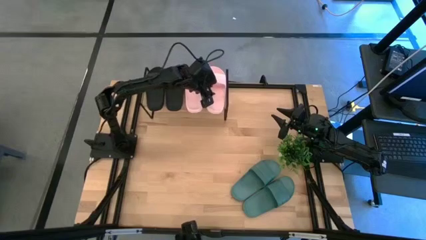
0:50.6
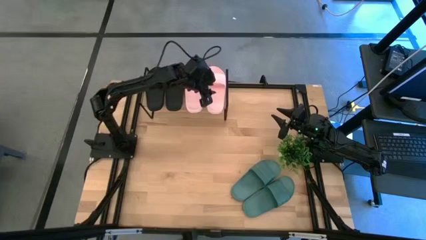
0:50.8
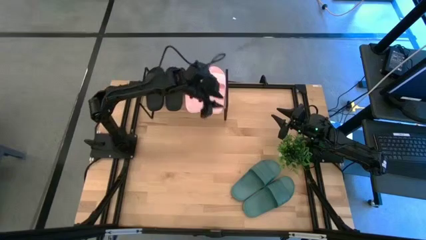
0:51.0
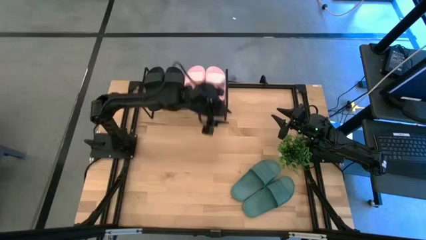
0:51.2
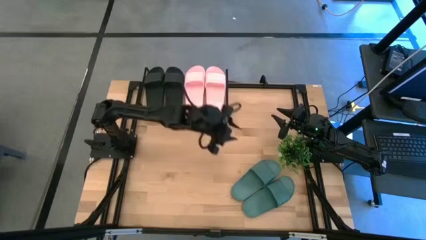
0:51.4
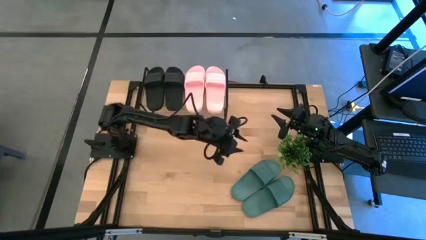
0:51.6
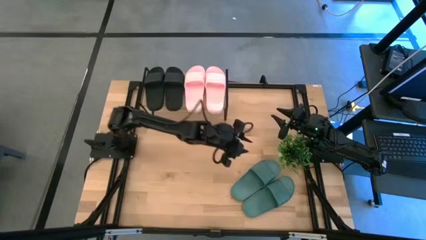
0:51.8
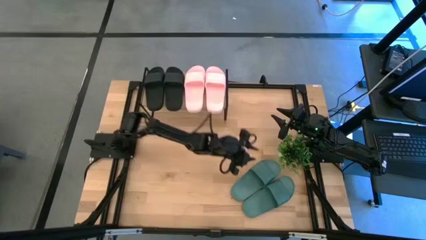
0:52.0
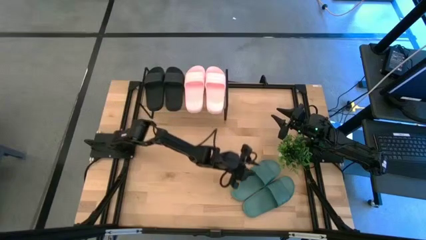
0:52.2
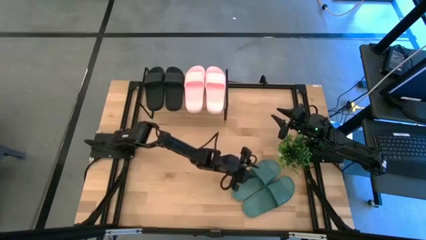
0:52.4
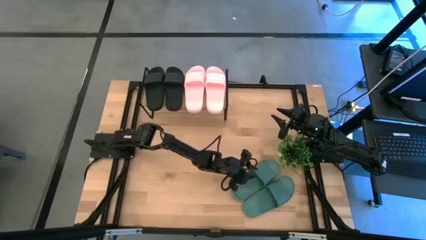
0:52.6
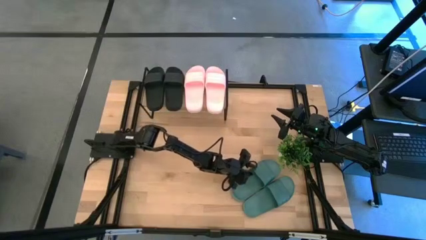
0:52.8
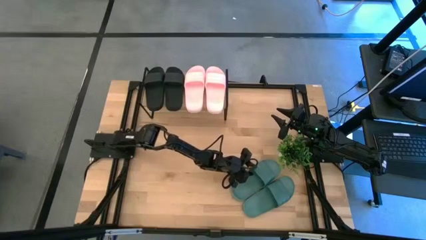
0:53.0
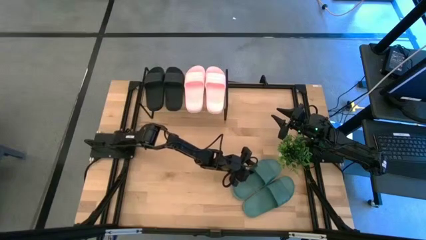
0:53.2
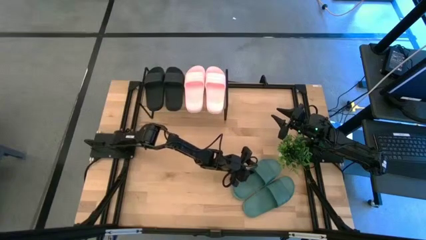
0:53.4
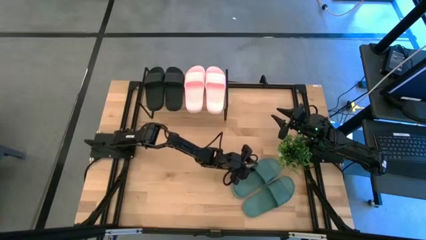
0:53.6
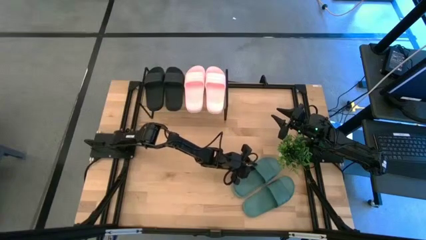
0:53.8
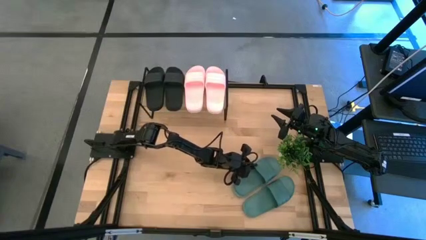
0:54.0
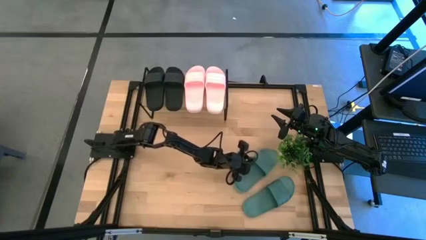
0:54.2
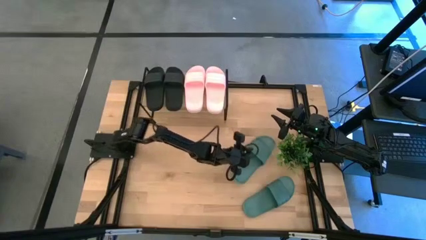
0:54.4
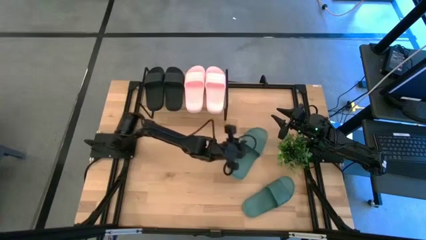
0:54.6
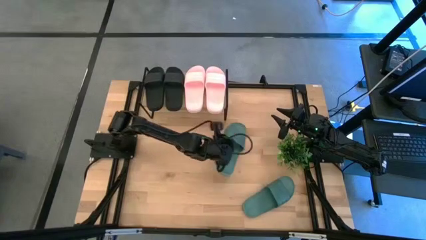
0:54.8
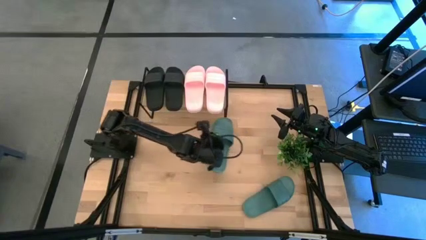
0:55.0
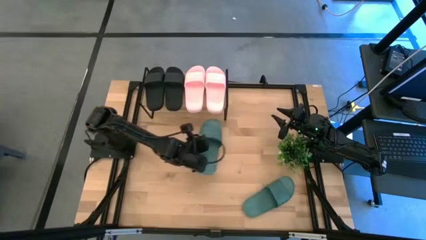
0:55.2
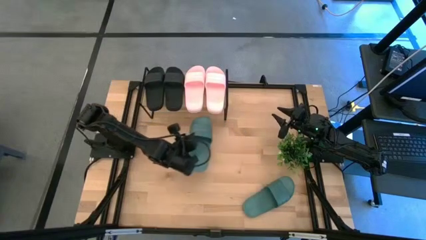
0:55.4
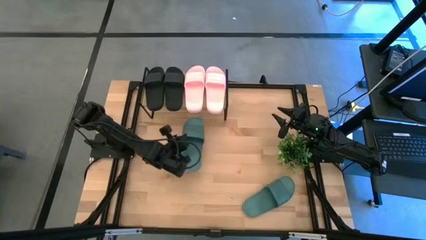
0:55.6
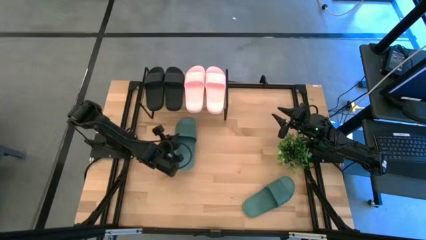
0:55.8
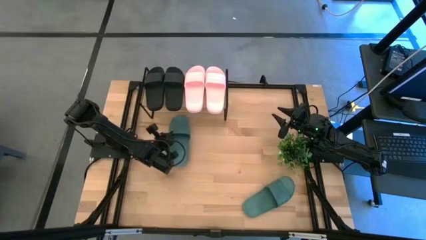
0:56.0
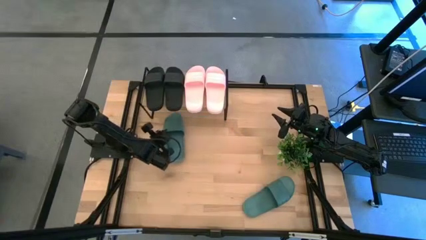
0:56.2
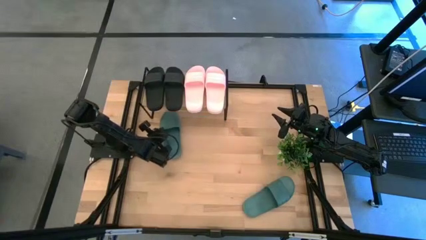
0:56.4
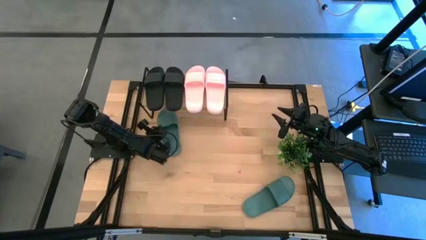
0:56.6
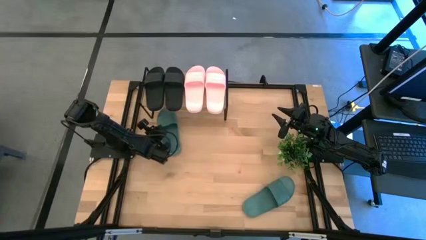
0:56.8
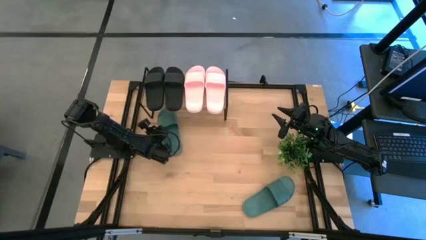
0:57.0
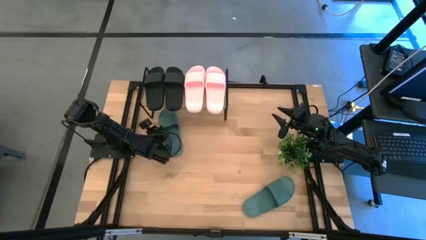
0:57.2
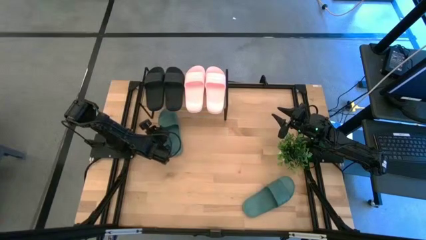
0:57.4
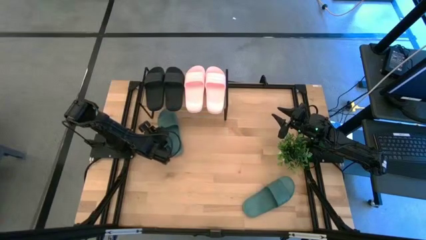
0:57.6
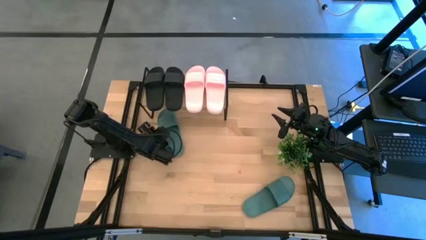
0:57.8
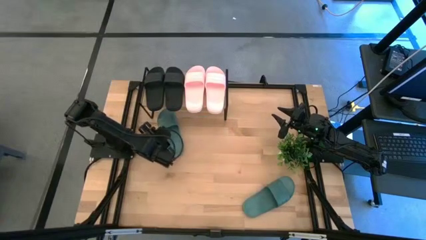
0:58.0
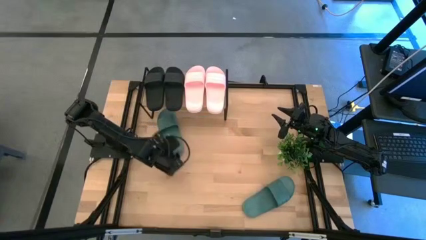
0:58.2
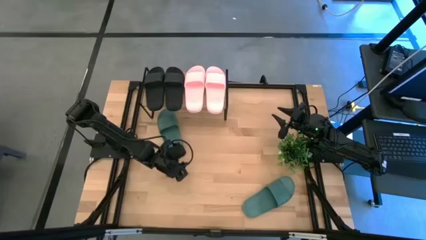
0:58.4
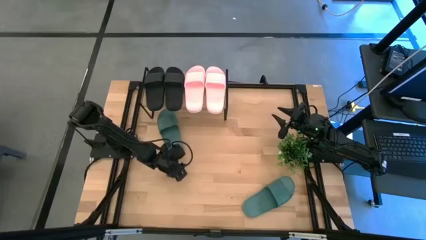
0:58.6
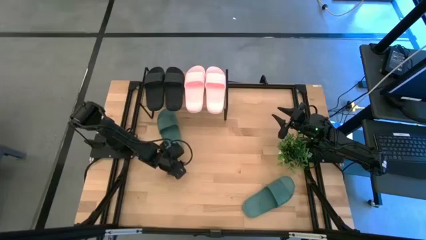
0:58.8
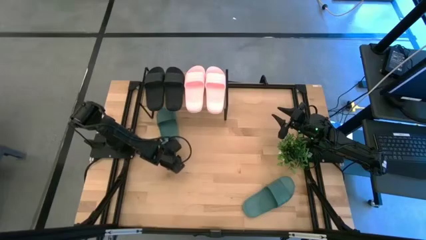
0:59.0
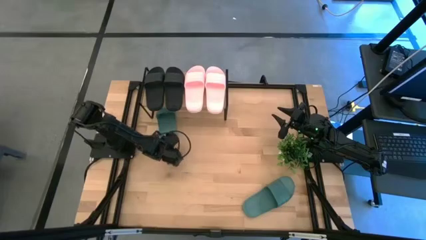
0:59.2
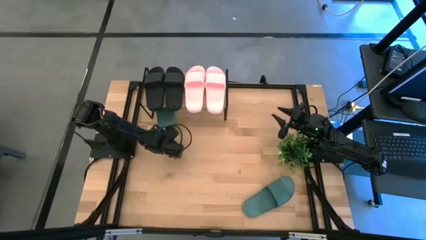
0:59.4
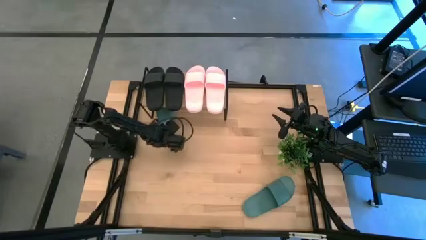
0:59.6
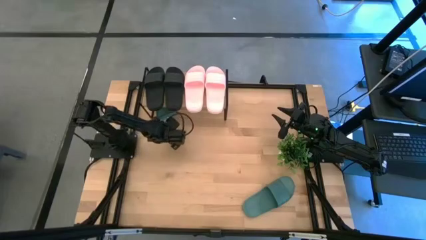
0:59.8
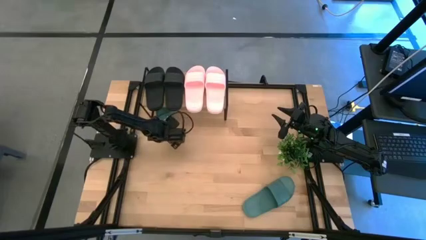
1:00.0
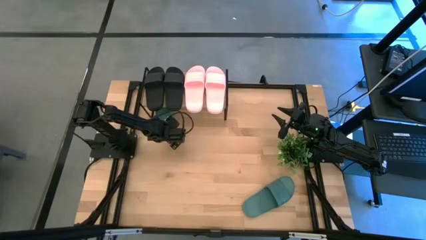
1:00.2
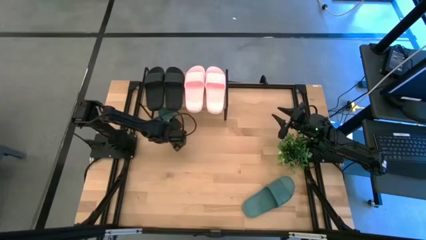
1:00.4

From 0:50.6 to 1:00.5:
Task: Pick and place slides into the shelf
Put the left green slide under the shelf

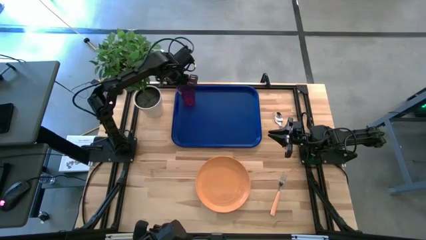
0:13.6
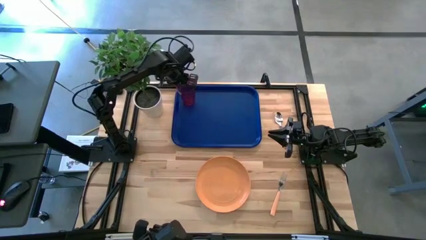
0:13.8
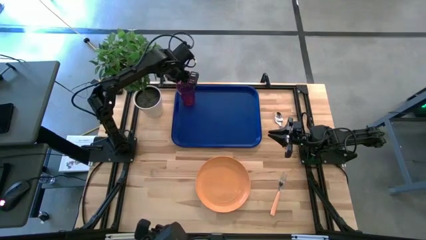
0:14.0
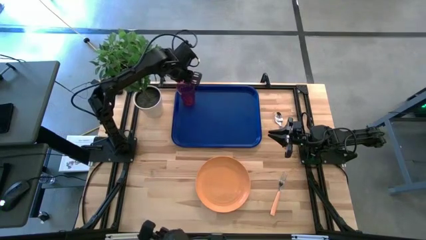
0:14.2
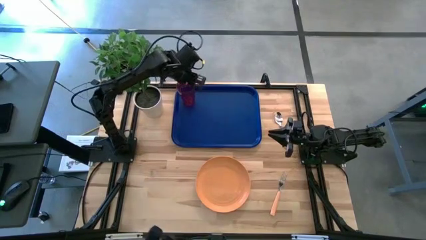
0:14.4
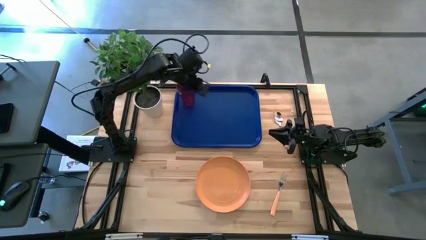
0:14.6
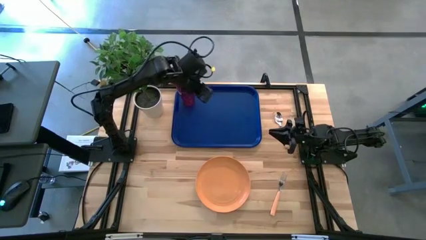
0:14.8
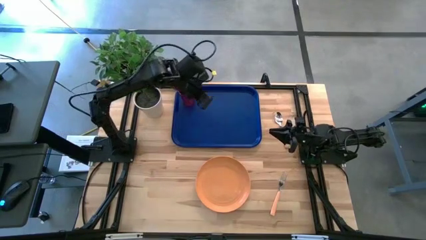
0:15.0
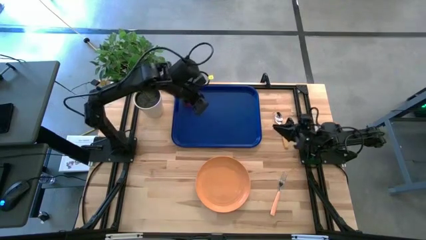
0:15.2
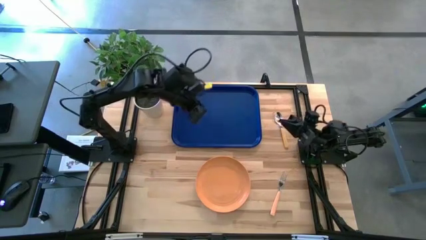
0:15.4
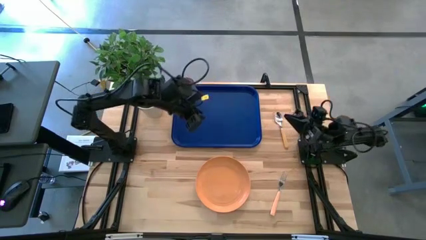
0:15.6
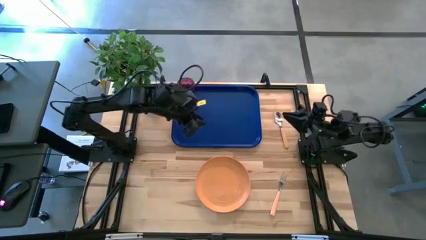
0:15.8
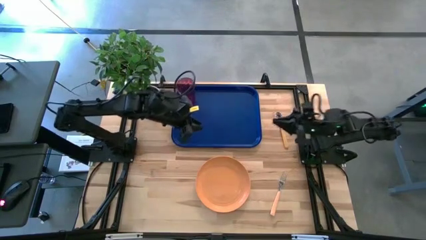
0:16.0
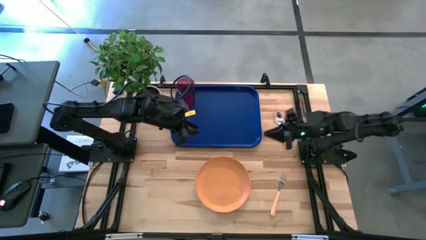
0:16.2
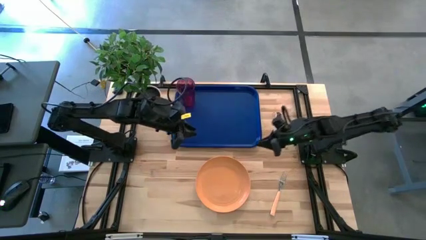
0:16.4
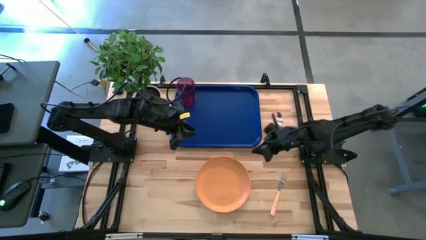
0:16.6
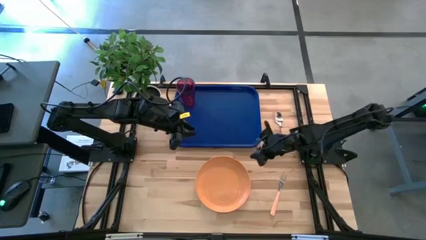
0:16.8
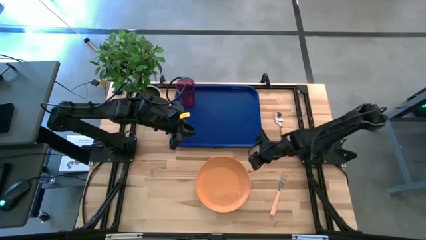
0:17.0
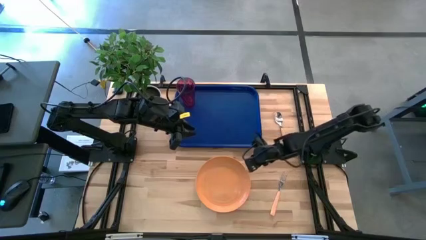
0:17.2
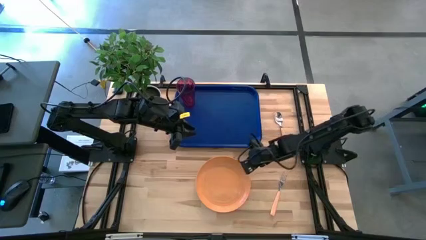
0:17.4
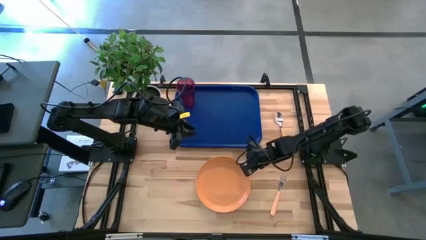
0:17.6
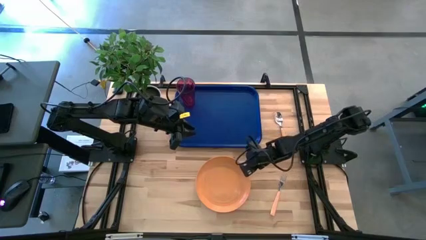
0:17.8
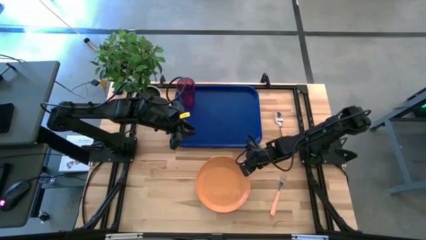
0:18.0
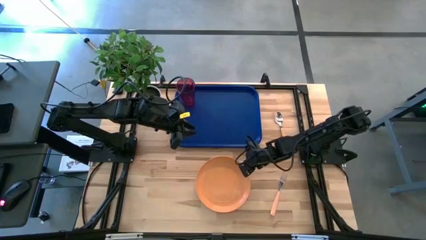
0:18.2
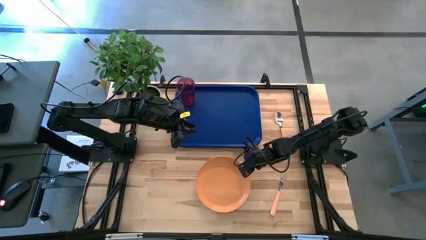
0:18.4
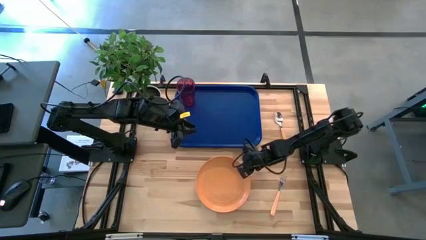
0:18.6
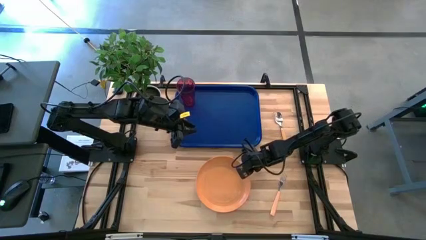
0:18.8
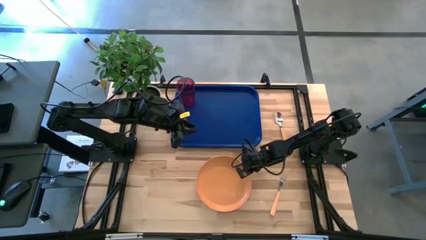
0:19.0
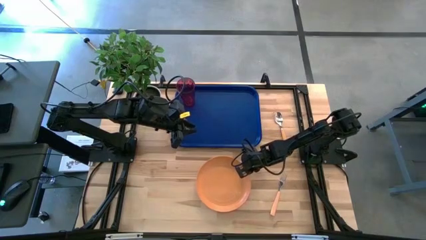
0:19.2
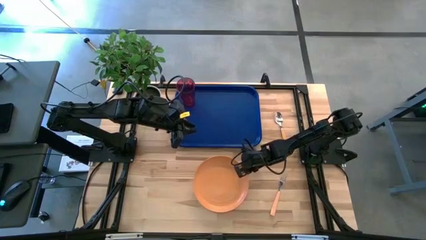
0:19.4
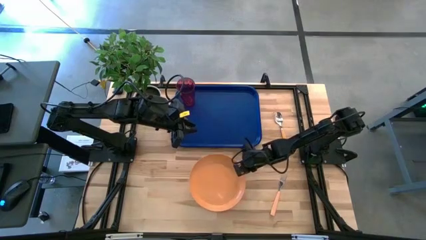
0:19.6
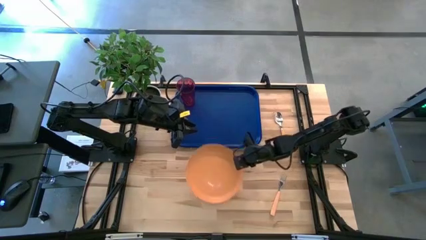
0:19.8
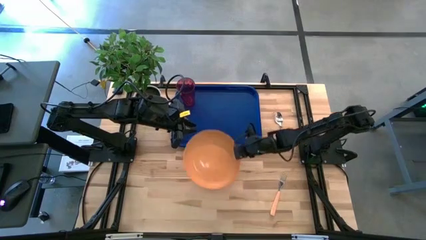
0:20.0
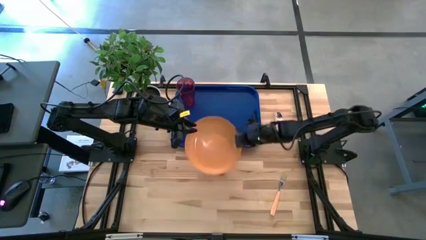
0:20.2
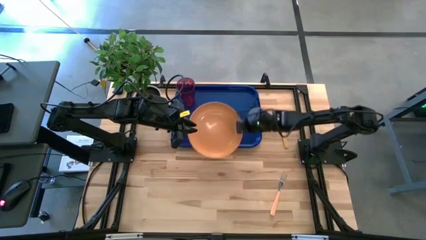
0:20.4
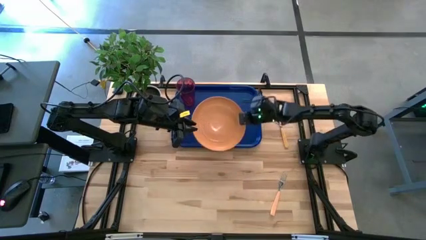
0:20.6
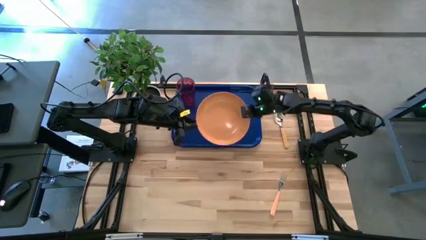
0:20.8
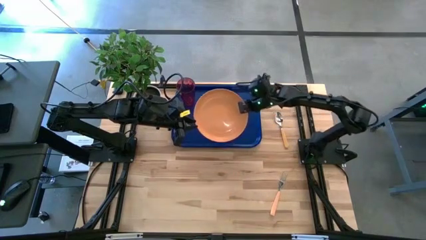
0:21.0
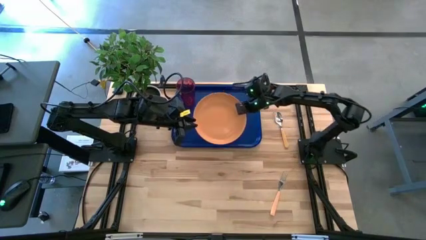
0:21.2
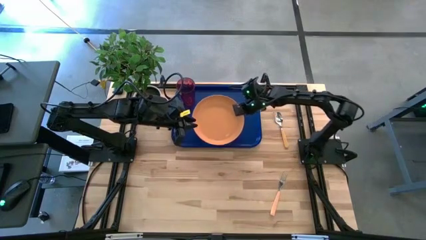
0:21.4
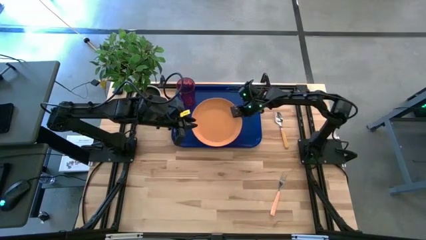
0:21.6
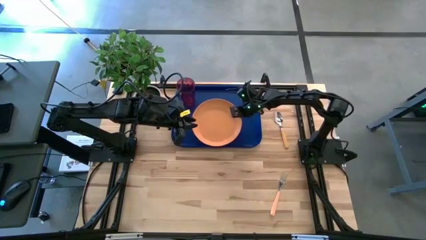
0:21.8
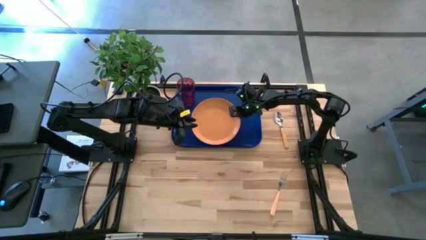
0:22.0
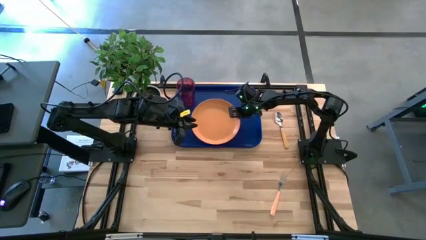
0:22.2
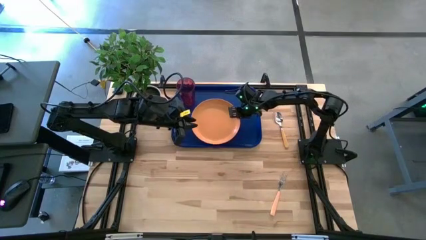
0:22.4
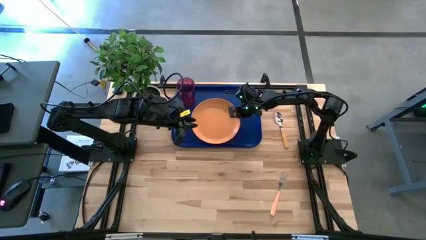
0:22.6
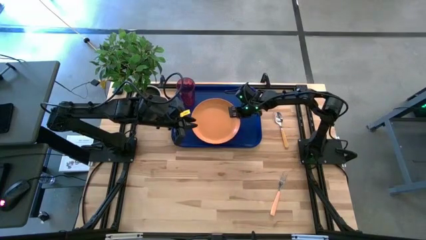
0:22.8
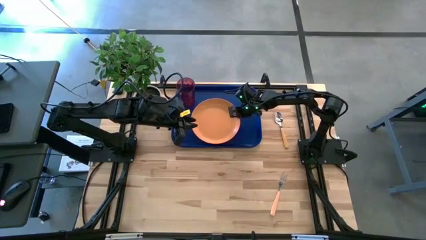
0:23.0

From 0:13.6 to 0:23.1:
Task: Pick and place plate/cup/fork/spoon on tray
Put the orange plate on the blue serving tray
